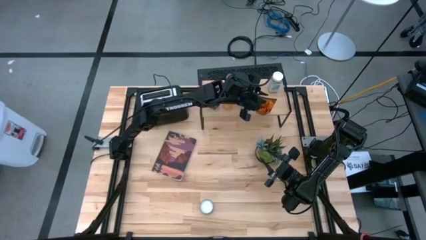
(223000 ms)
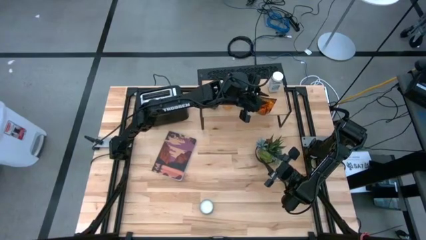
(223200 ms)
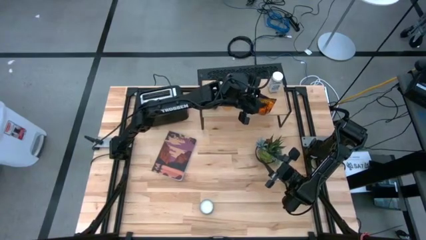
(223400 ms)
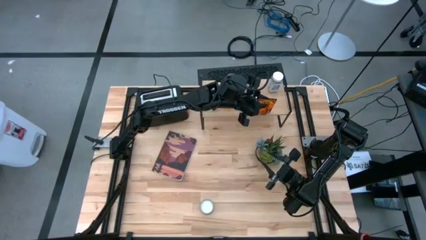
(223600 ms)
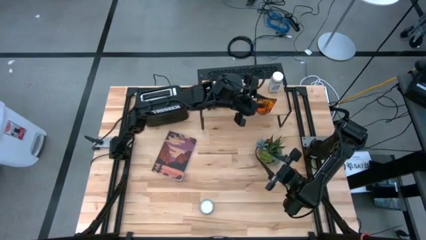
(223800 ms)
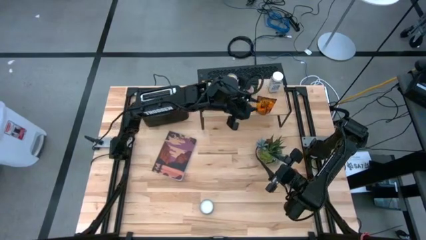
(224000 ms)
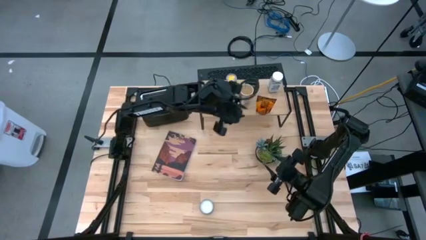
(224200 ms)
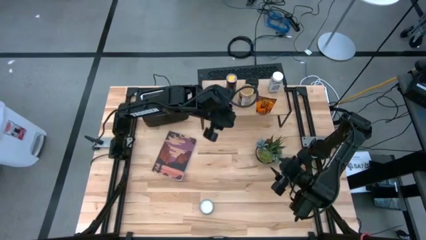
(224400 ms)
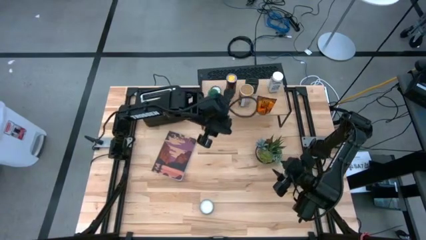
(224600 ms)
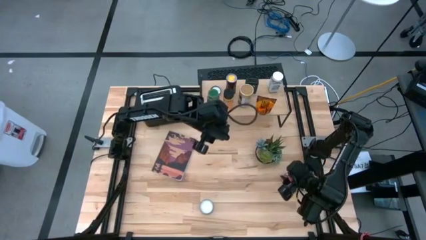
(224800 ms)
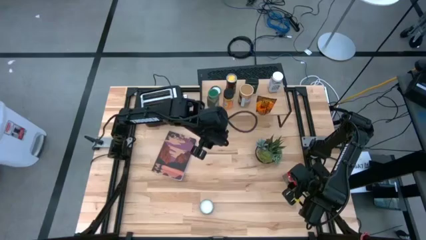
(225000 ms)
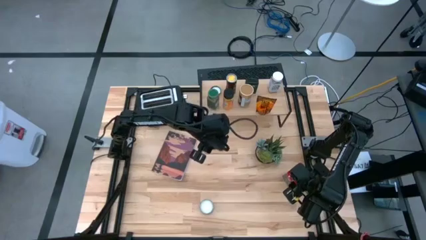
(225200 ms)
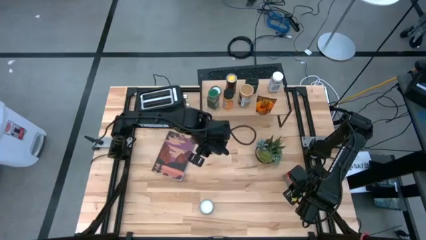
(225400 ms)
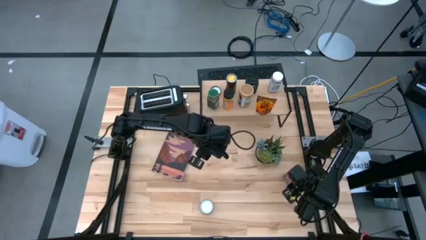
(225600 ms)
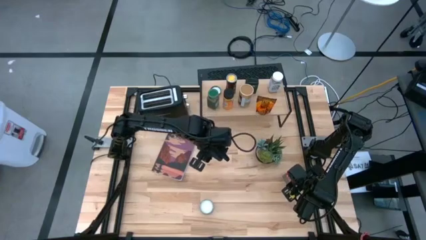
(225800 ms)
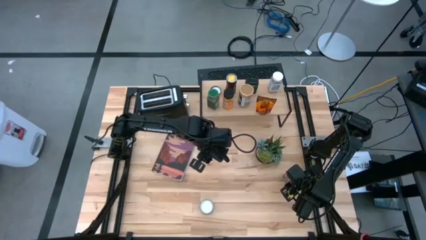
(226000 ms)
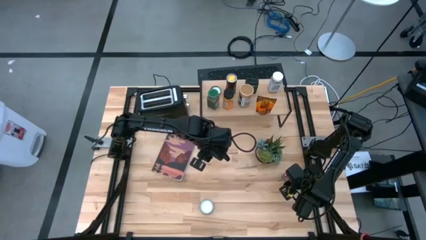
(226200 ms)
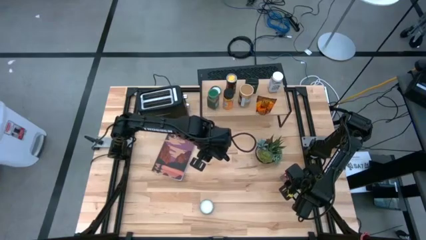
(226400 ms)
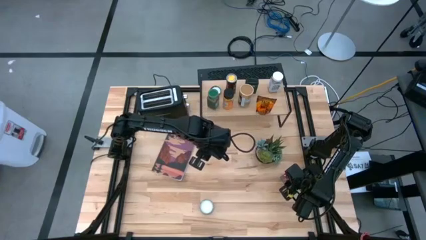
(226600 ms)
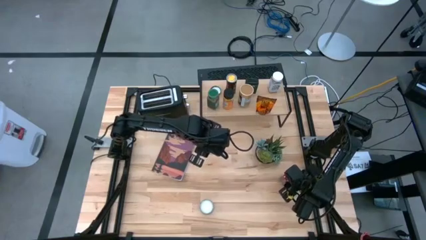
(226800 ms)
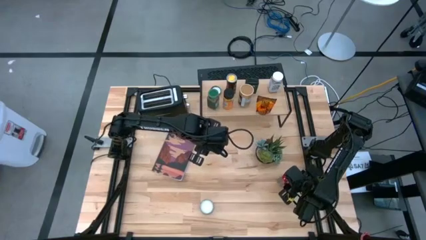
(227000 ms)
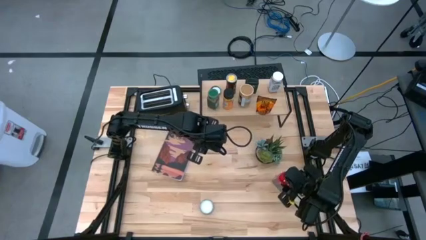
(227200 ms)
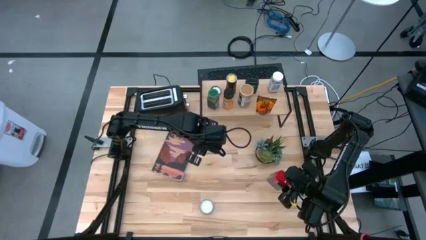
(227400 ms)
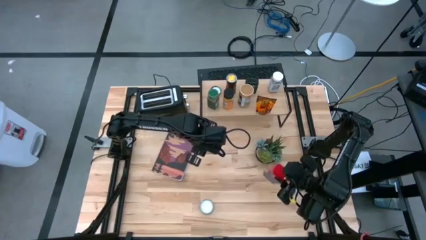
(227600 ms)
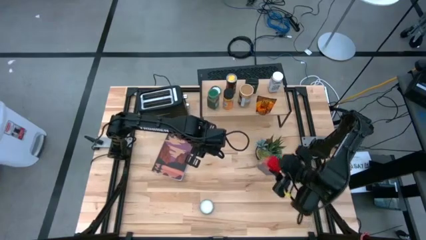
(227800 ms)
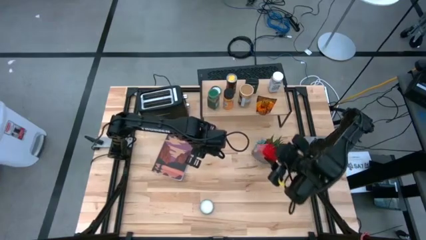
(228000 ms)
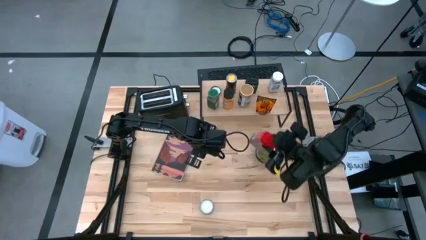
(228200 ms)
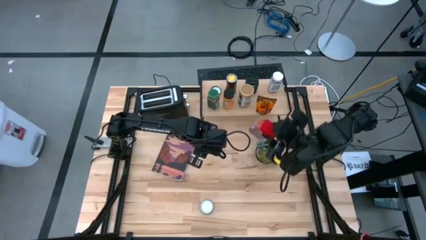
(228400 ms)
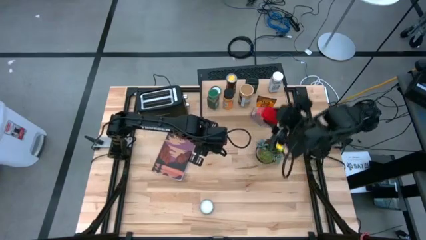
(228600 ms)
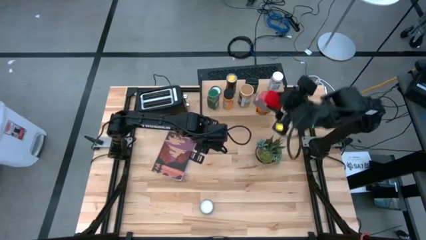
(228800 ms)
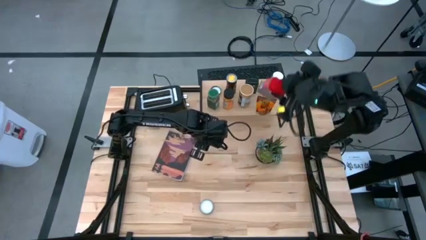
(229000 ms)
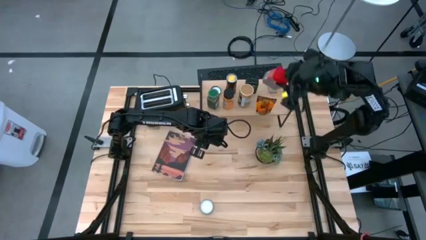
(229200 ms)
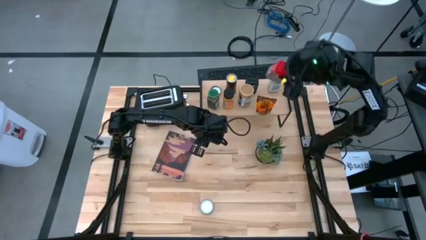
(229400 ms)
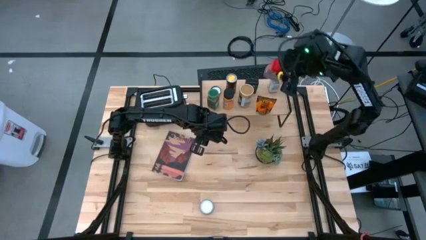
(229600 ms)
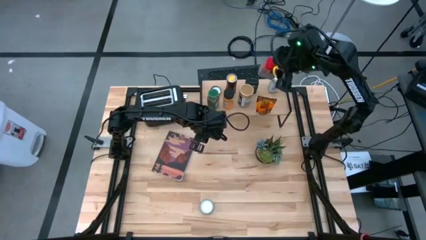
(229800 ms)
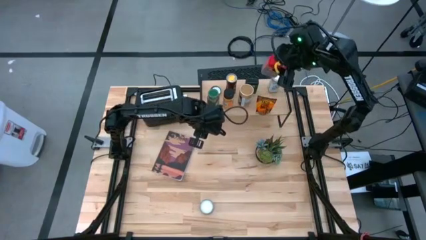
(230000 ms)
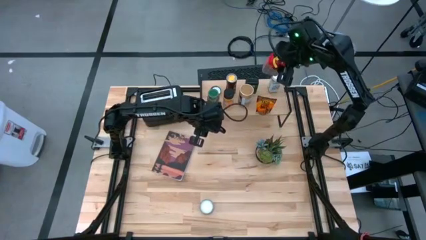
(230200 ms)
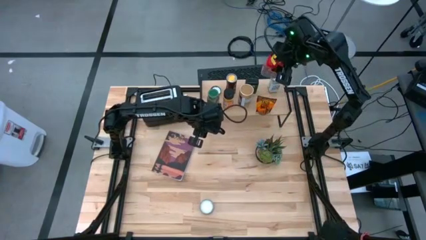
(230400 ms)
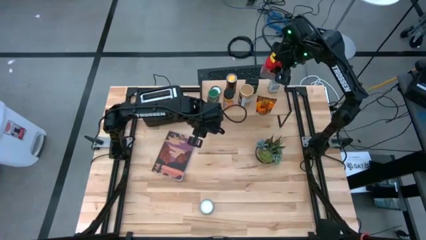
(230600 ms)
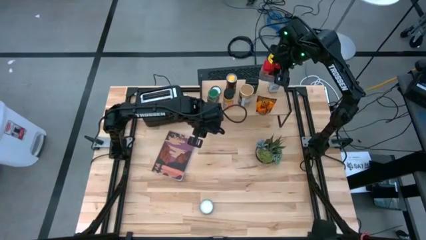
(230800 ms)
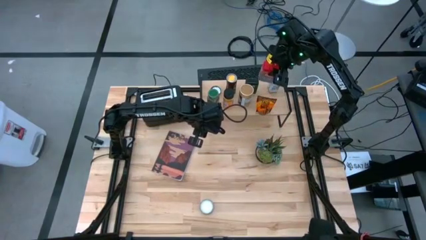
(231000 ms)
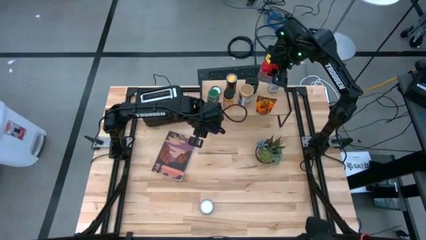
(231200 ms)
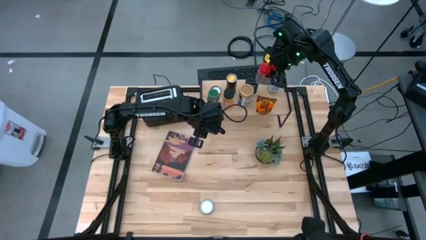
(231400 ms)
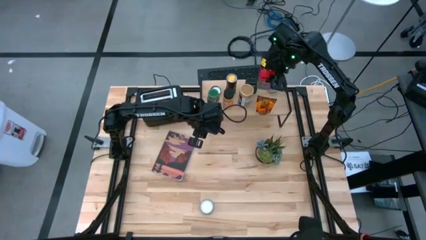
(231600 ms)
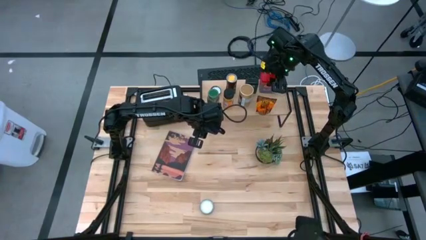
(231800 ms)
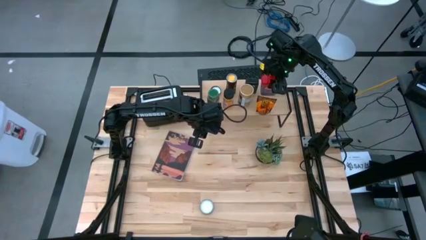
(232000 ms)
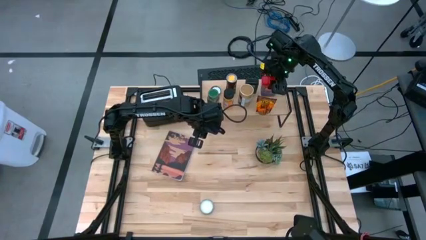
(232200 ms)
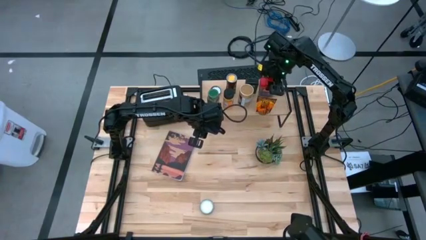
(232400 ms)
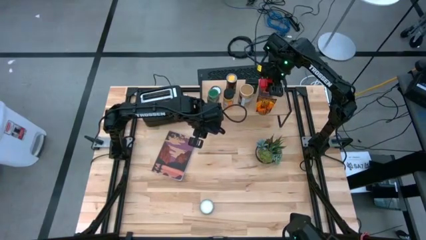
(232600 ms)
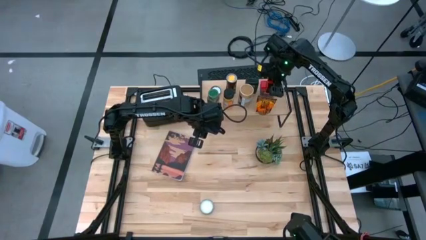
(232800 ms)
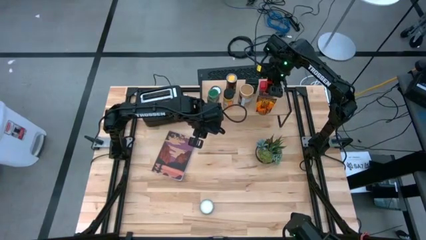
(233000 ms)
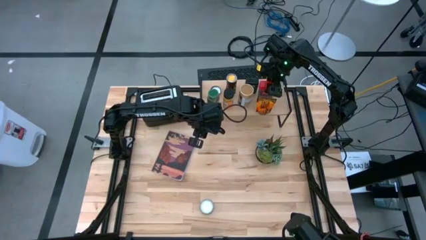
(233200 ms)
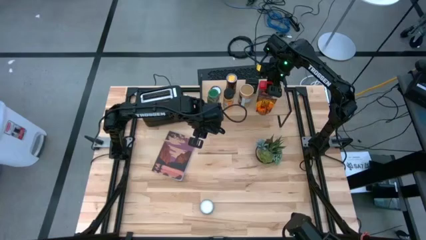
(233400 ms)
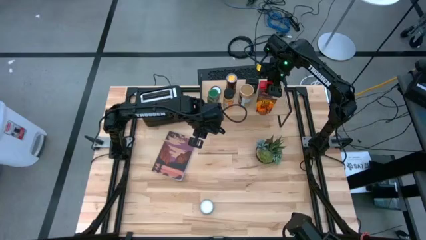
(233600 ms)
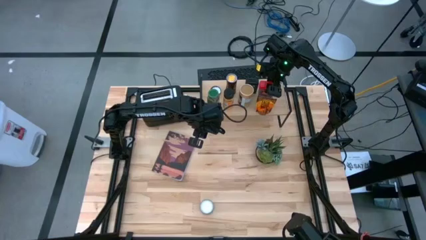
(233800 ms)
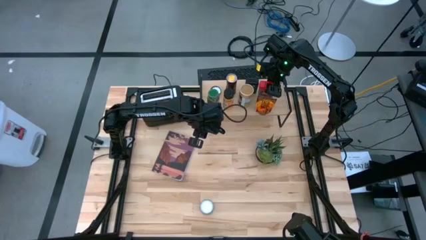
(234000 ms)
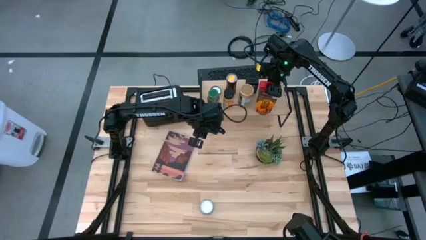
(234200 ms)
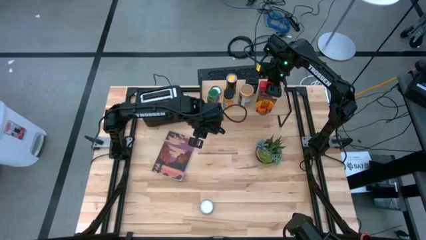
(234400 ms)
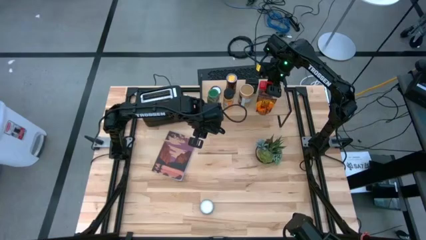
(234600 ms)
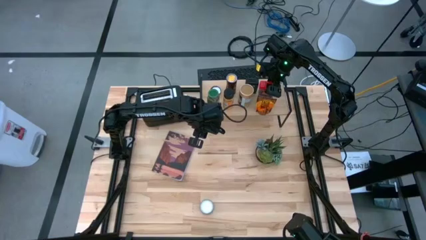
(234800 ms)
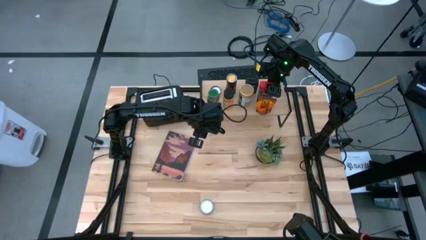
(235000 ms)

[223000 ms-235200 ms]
Task: Shelf spices
Put the red seasoning can on the shelf

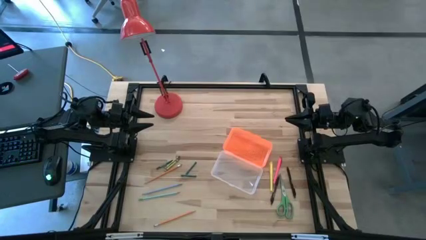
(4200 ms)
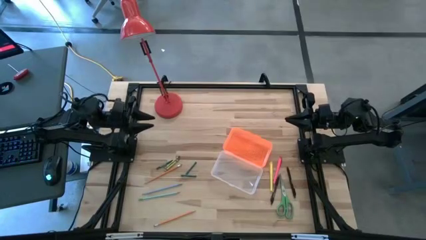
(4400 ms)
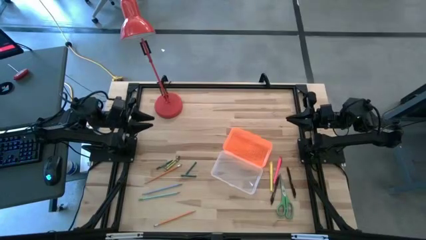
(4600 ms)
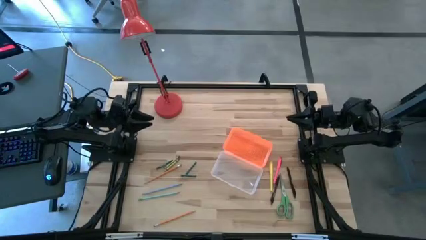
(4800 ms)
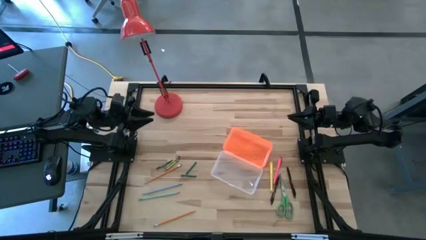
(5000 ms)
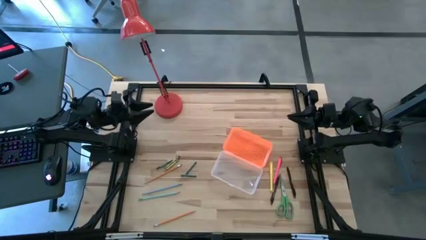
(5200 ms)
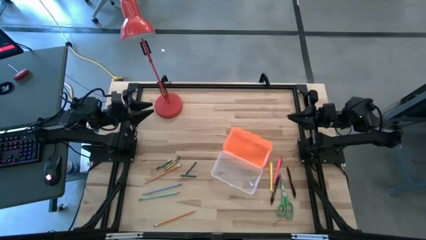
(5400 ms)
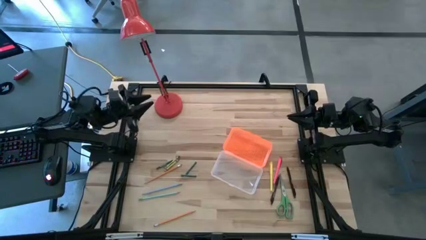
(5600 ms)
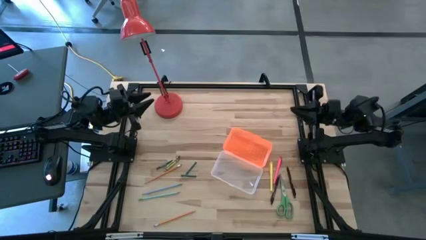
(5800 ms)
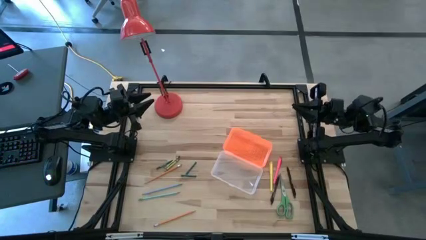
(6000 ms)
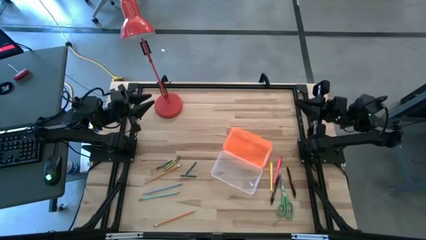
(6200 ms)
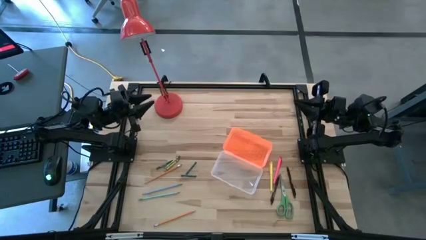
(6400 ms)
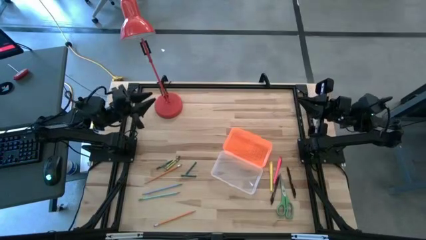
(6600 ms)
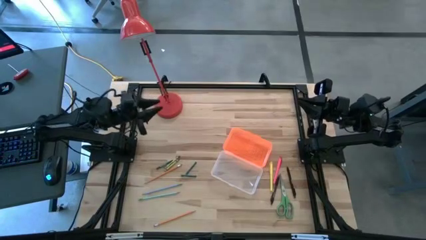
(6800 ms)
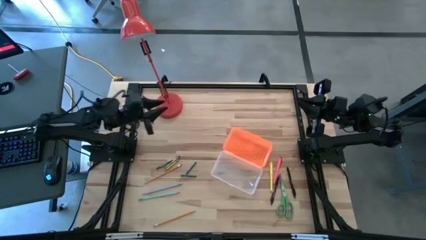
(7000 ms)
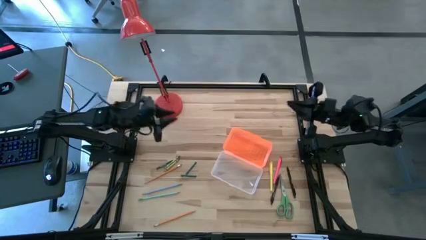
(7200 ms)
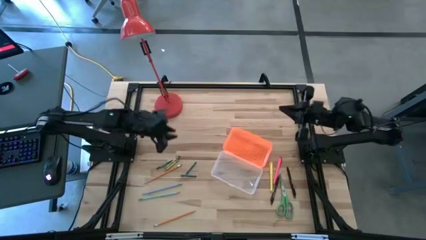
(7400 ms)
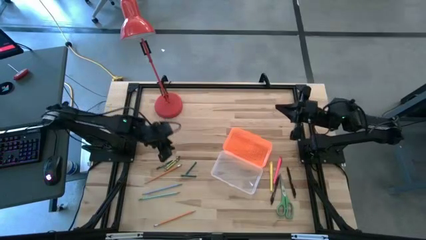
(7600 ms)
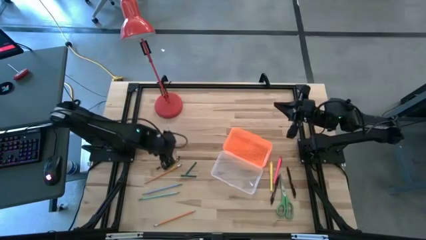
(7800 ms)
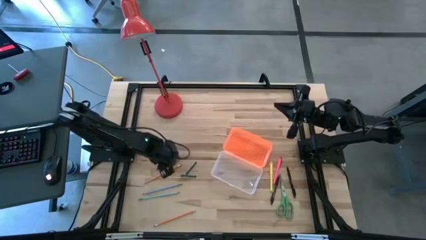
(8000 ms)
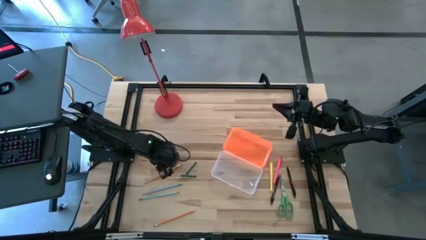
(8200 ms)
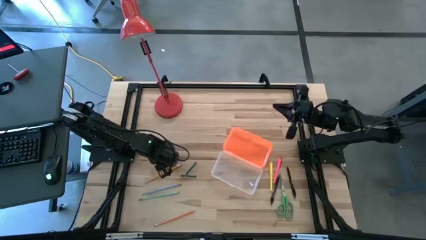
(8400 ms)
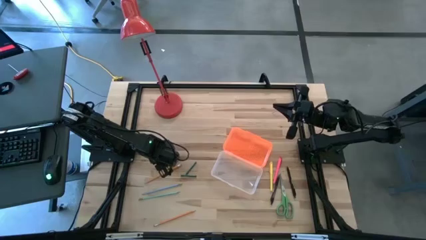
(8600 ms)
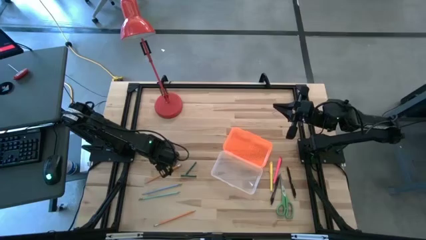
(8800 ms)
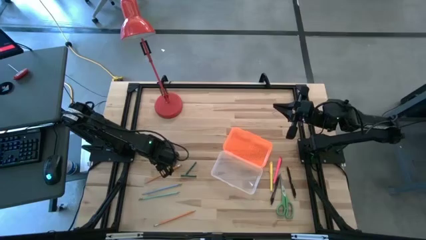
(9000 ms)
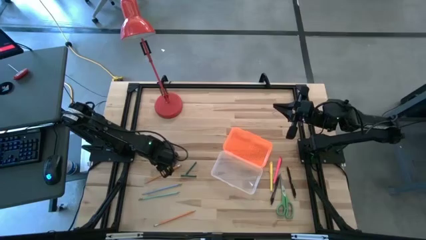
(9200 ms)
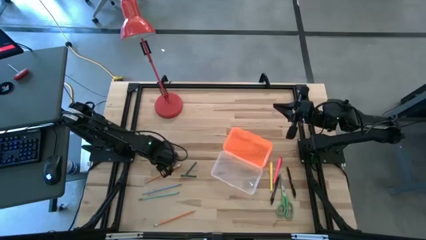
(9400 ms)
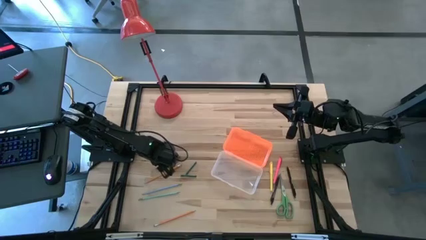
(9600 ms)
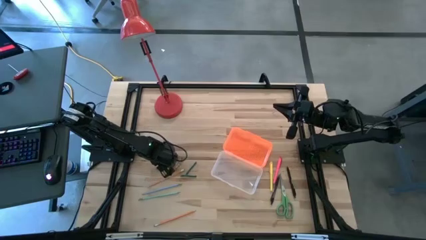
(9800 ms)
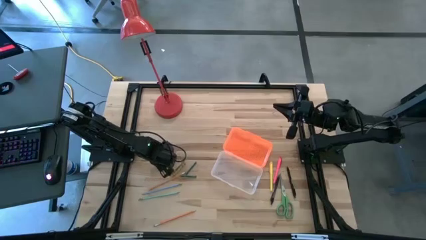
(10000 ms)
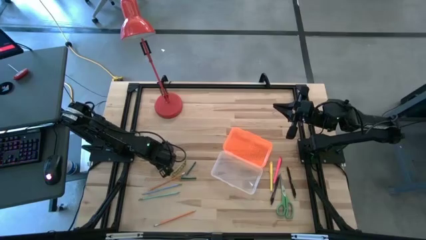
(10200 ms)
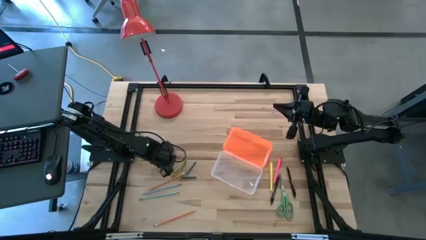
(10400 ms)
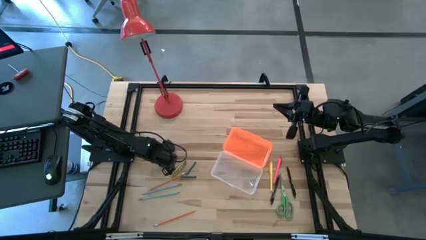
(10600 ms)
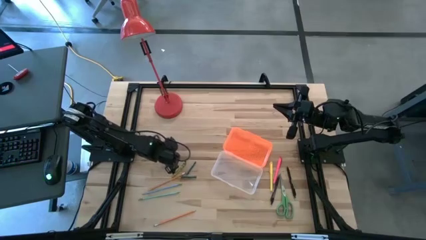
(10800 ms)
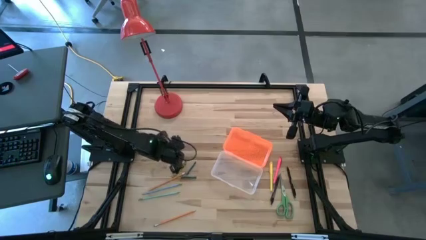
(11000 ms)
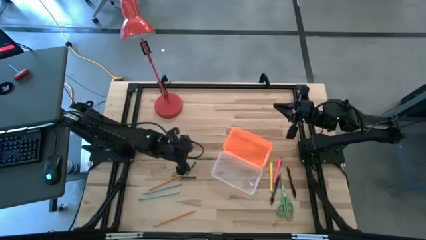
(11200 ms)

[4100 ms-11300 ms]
Task: Pick & place school supplies into a supply box
Put the top left green crayon into the supply box
